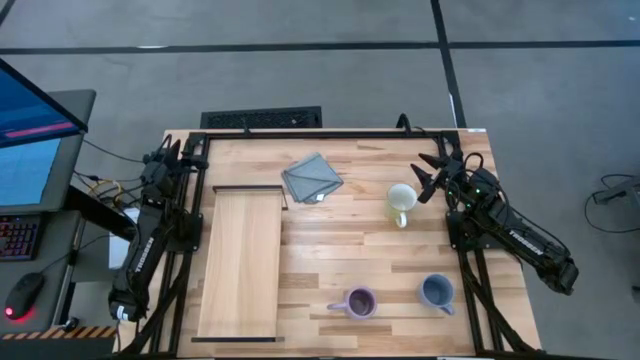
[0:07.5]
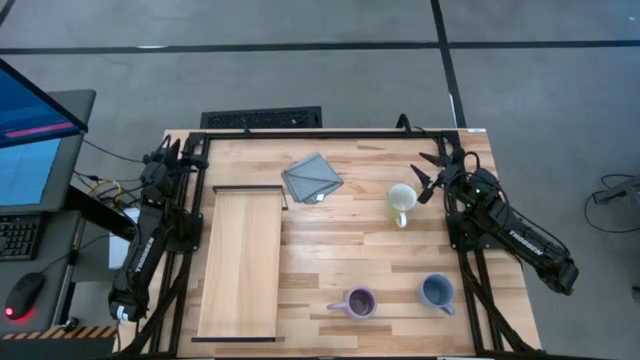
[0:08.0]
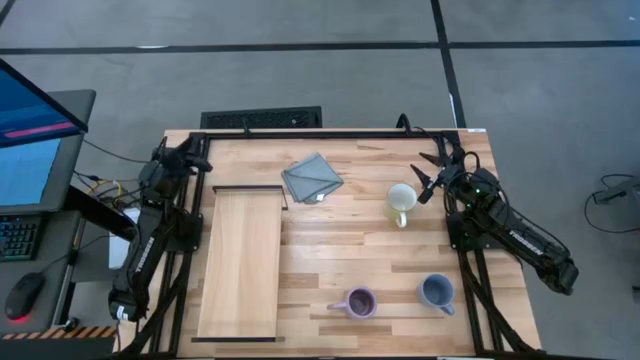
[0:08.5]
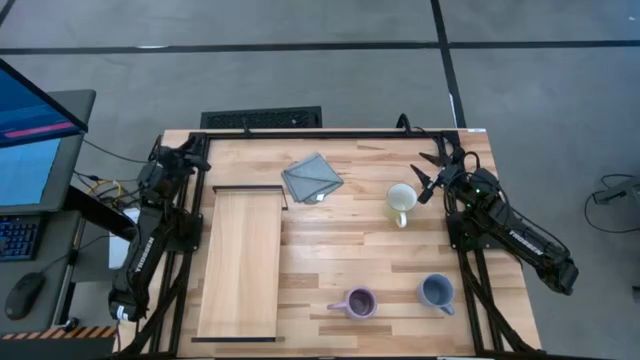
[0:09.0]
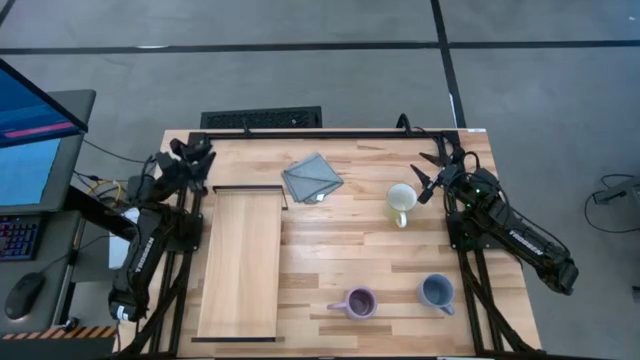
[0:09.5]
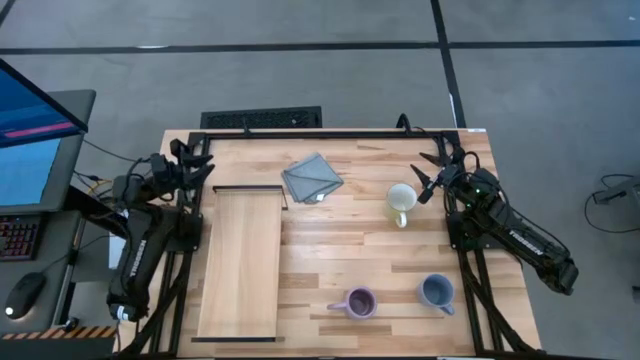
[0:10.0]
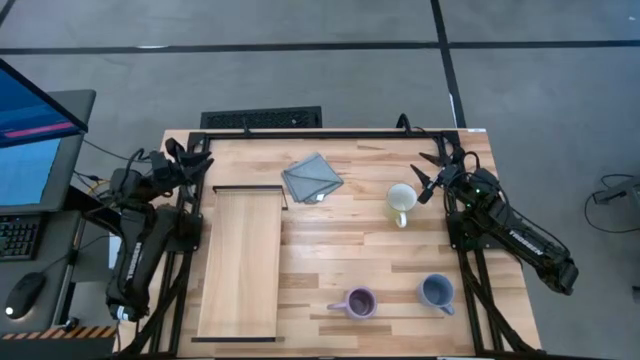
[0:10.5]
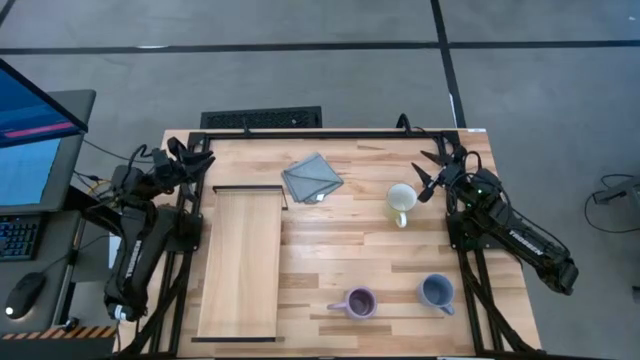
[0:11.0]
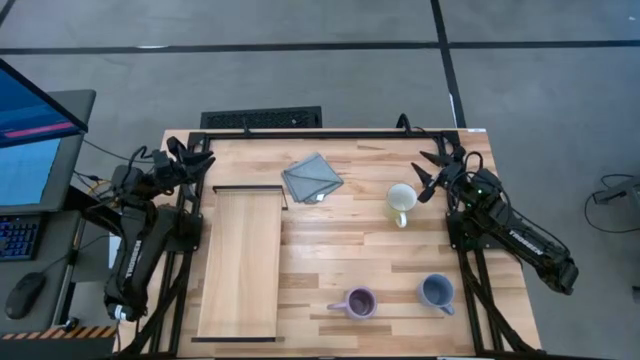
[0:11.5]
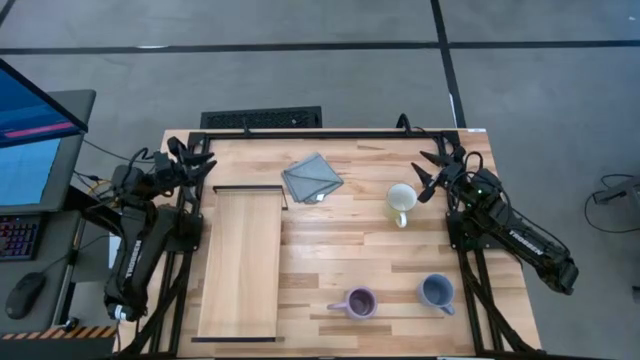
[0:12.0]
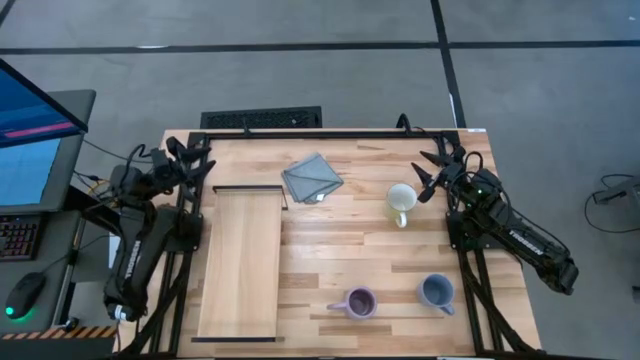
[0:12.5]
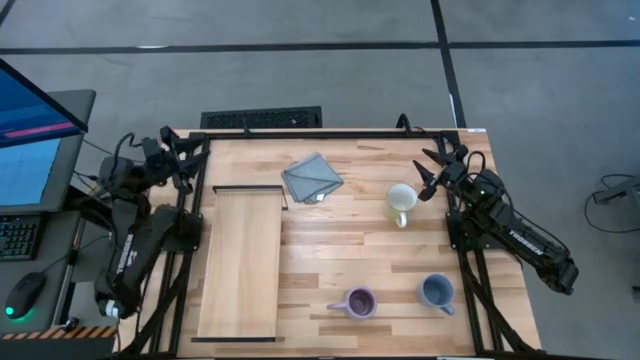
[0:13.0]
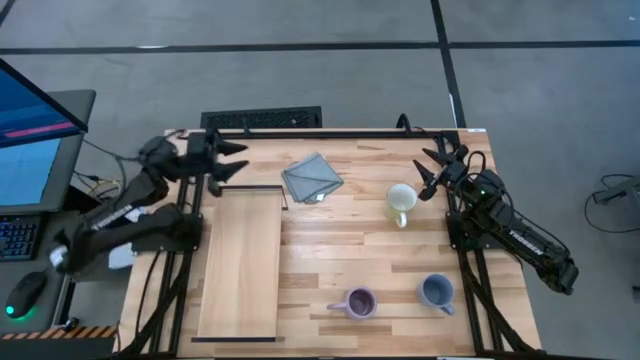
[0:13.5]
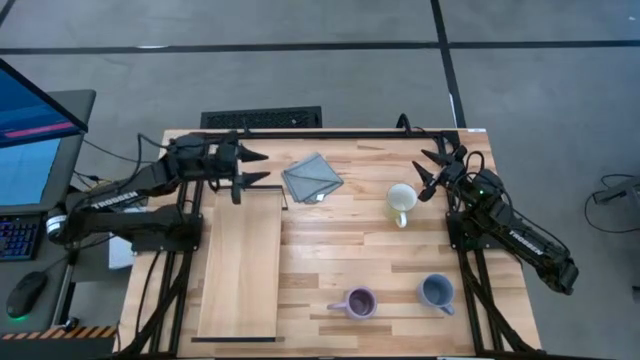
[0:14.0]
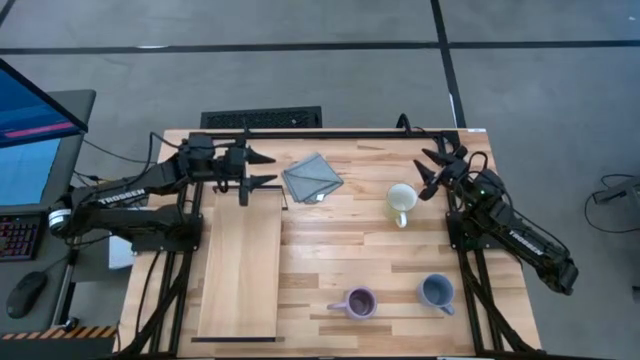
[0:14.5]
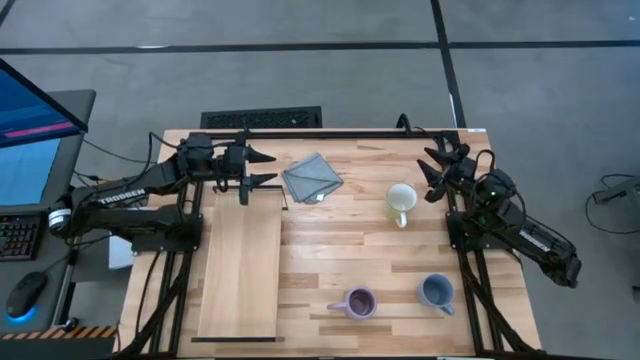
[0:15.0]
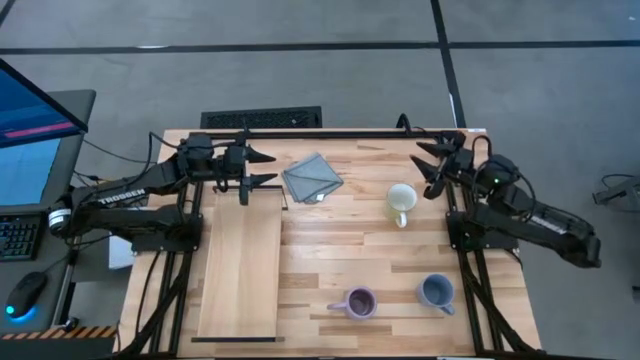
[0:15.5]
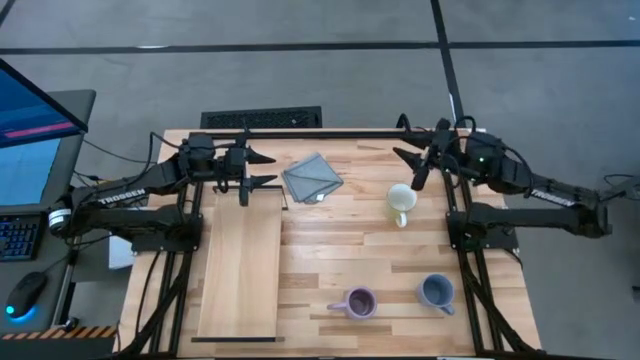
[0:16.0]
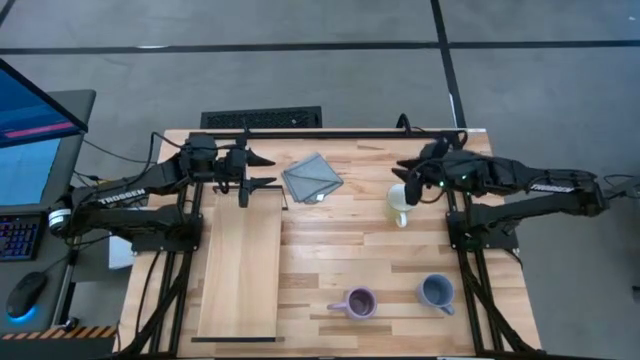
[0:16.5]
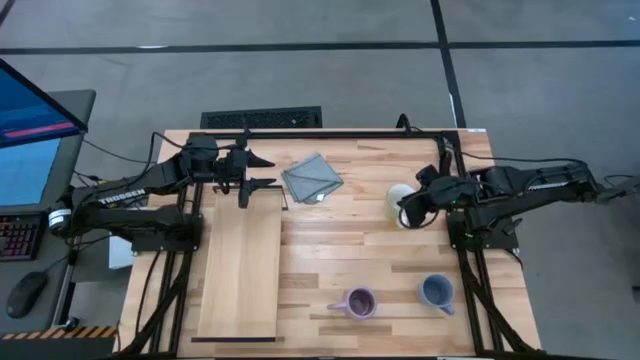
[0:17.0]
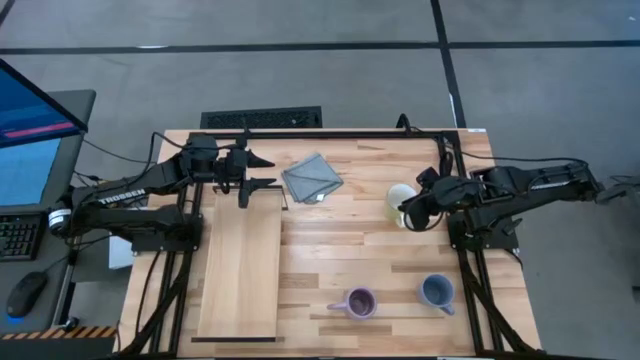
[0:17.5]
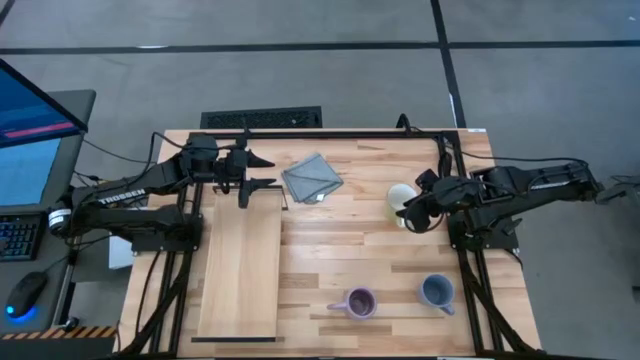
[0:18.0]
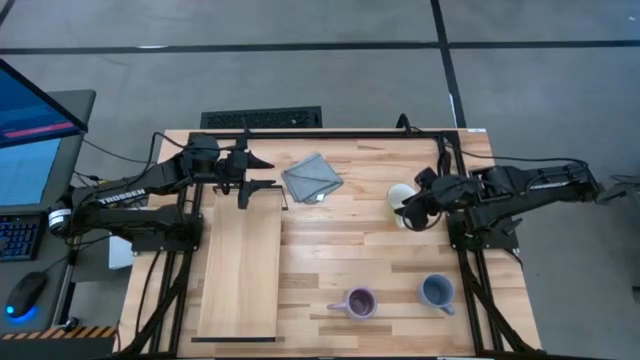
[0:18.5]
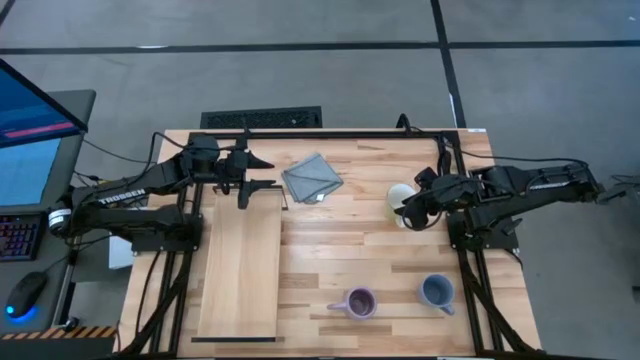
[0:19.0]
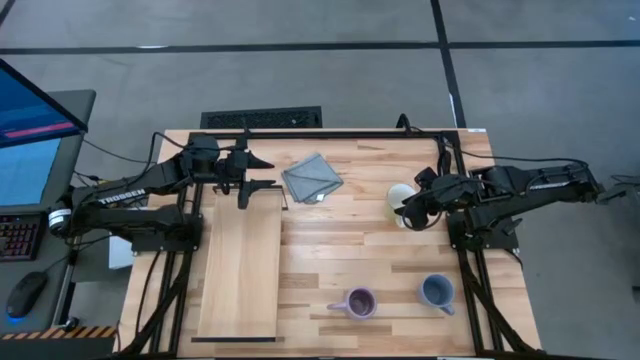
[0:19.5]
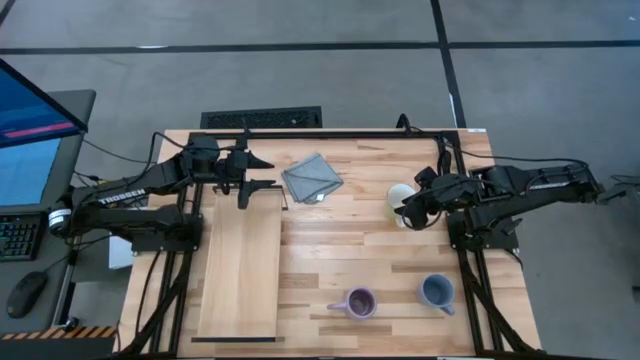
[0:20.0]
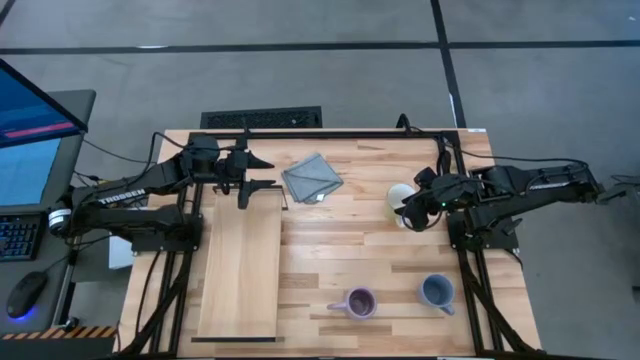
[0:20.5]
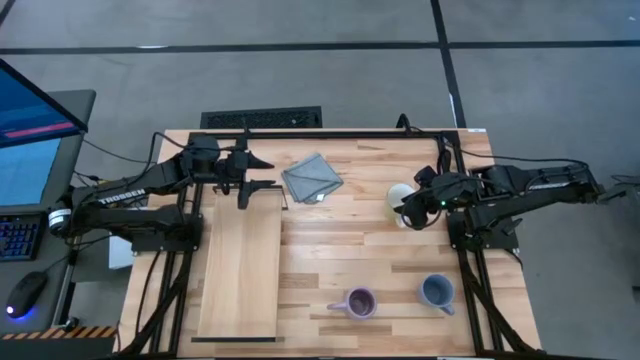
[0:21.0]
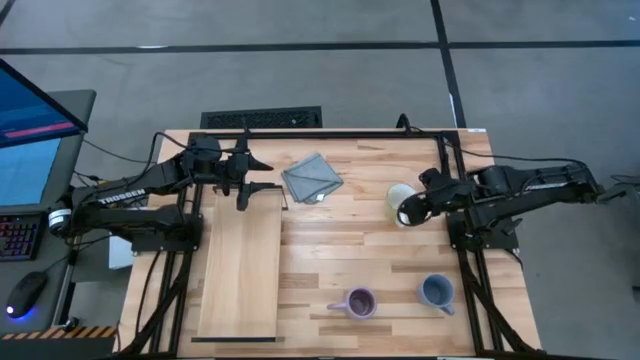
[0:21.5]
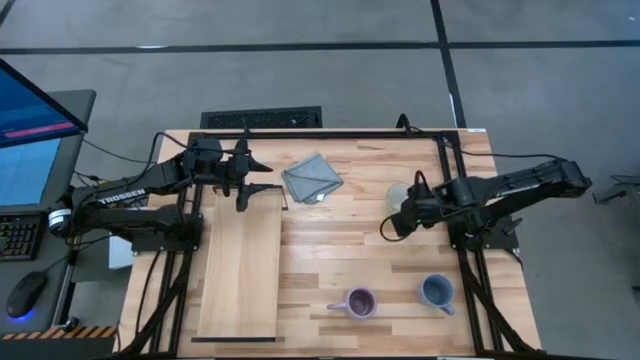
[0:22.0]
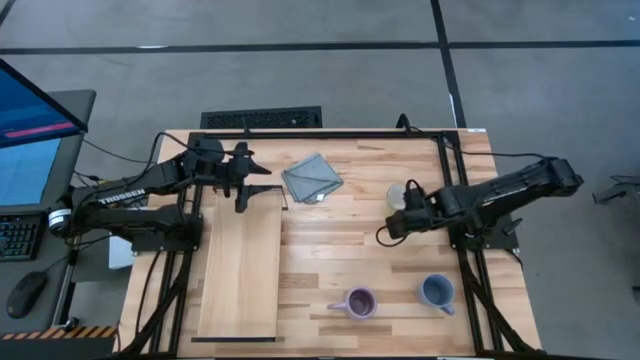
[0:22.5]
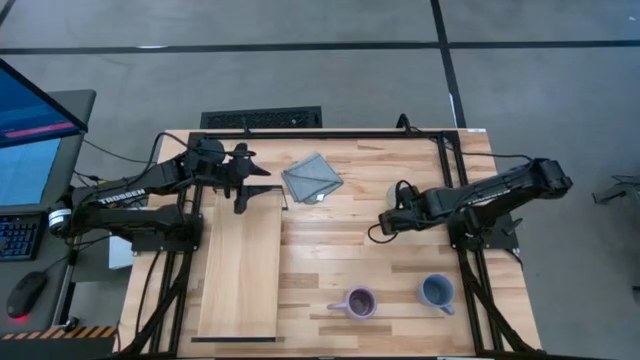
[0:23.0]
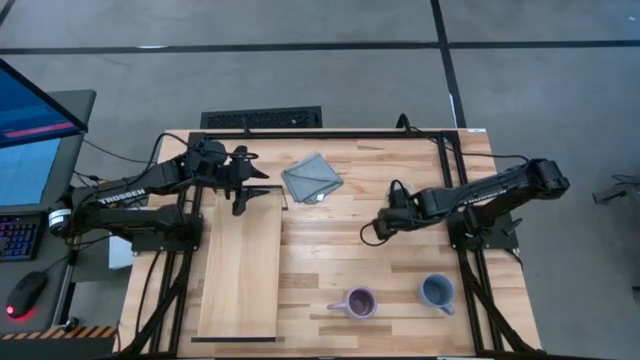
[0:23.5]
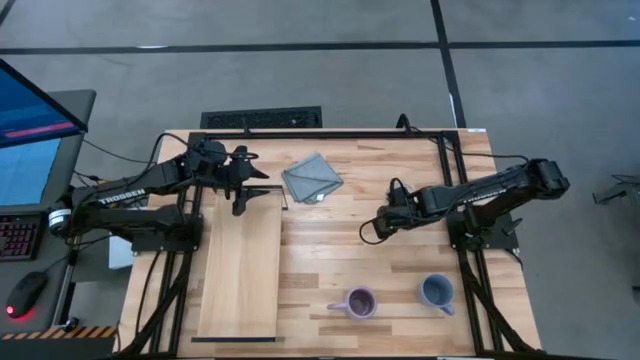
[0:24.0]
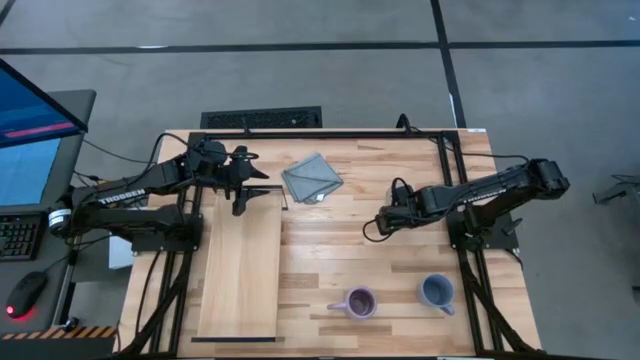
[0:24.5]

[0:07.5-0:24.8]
Task: Stack small to large cups/mugs on shelf
Put the yellow mug on the shelf

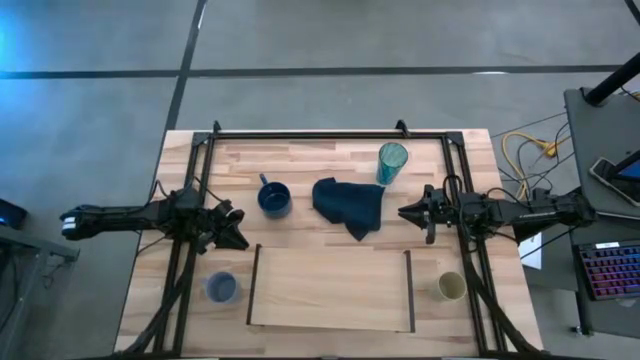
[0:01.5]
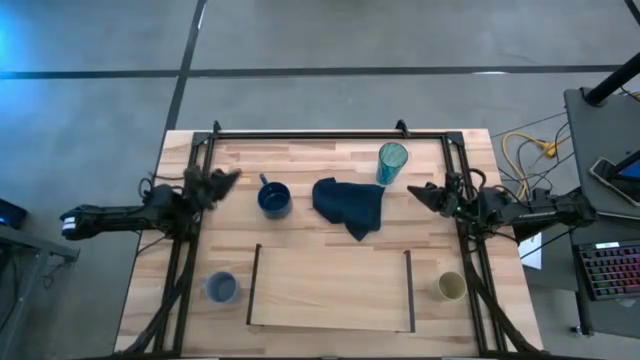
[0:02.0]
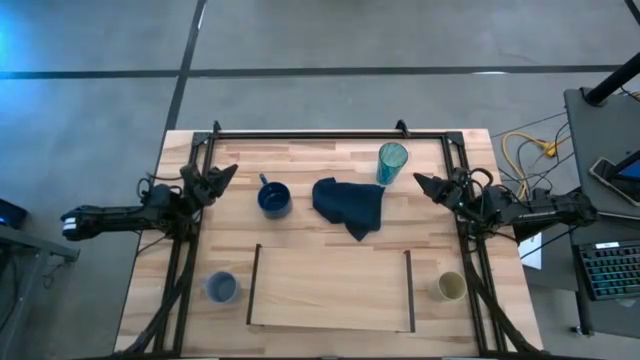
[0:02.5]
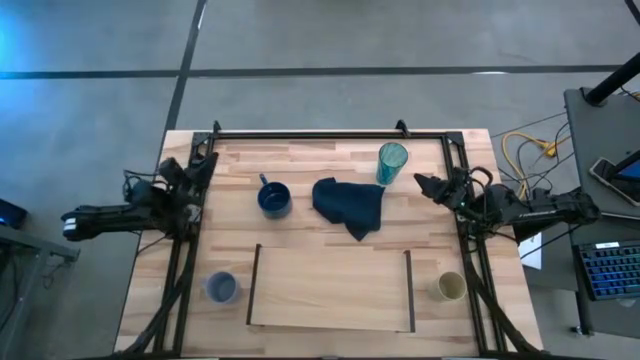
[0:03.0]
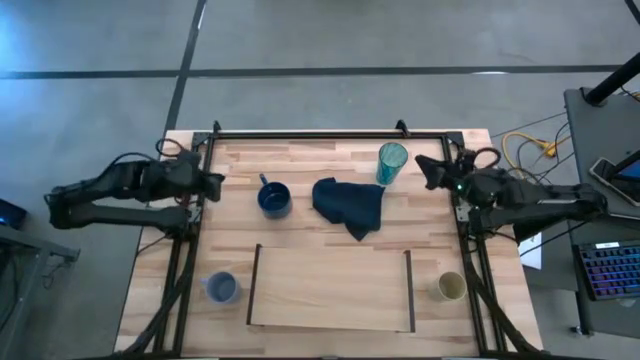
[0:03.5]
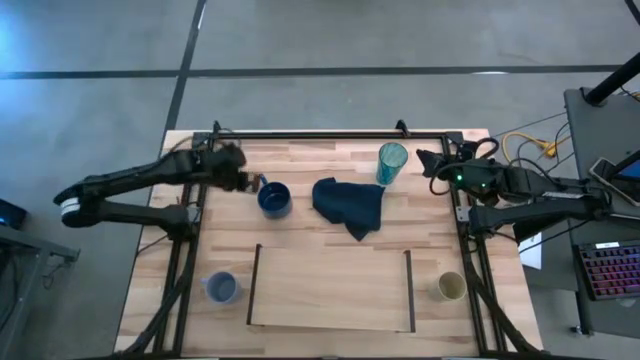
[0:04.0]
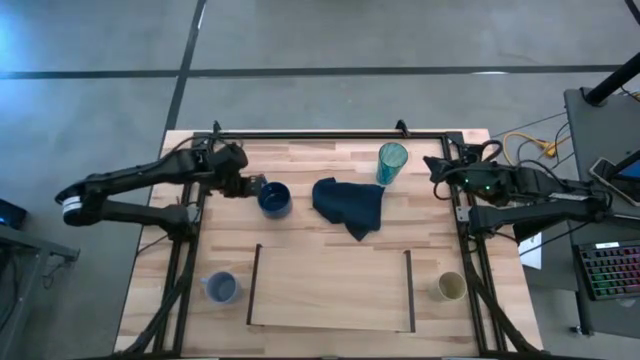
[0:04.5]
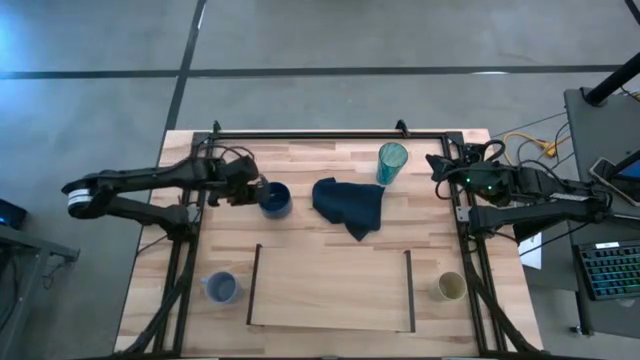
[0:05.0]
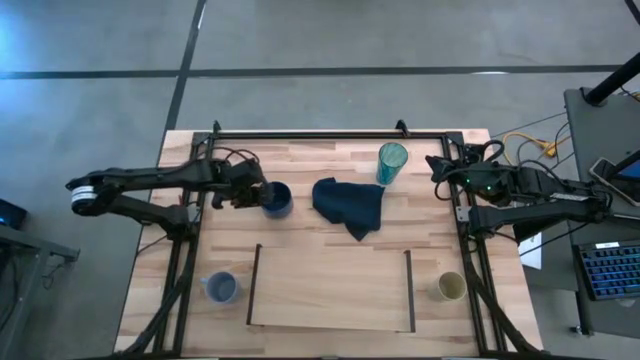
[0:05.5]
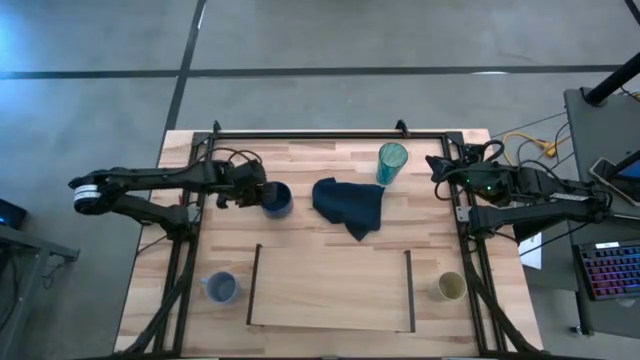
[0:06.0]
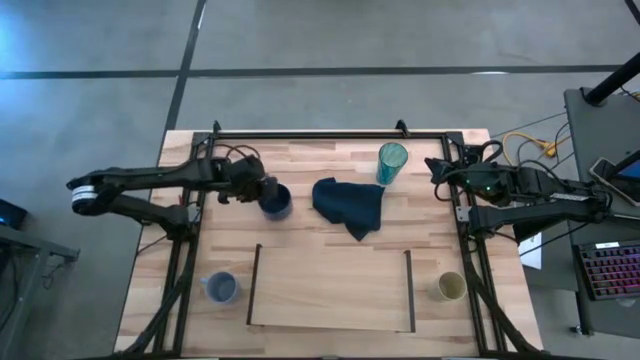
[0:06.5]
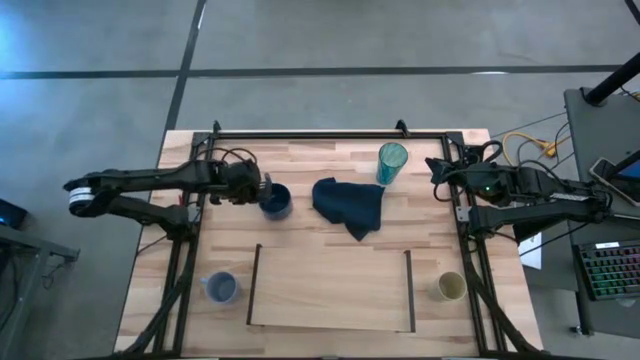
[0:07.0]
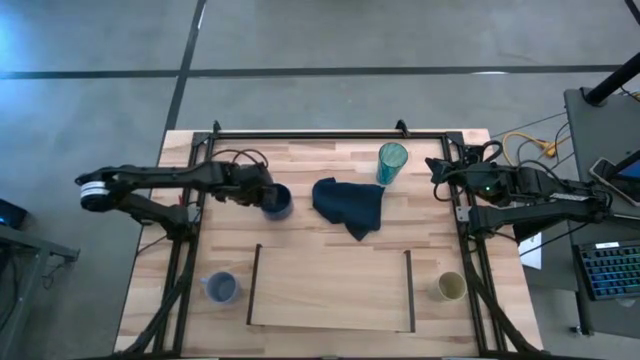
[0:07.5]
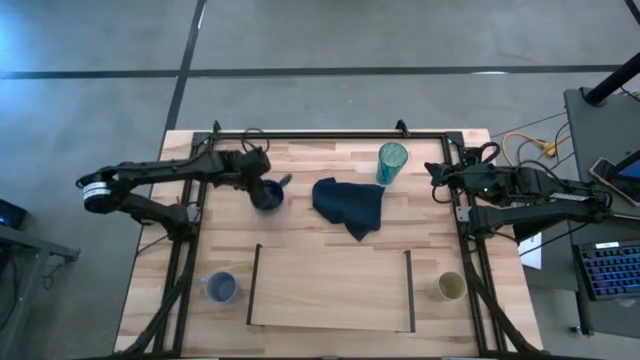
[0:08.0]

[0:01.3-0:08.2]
Task: Stack small to large cups/mugs on shelf
Put the dark blue mug on the shelf
